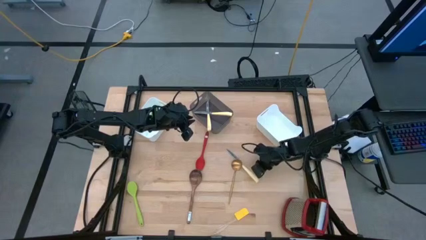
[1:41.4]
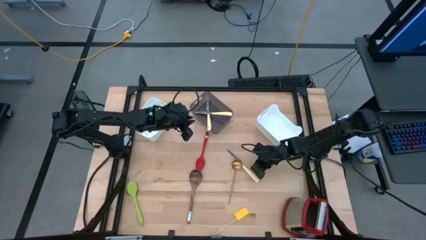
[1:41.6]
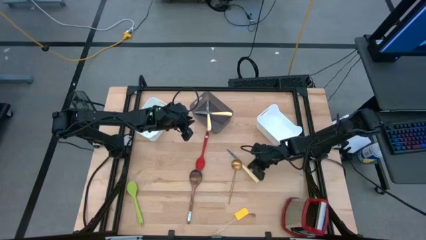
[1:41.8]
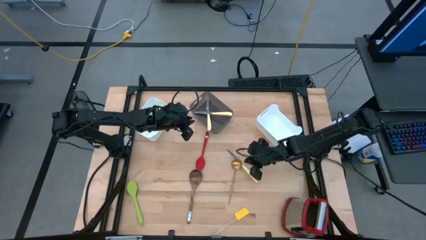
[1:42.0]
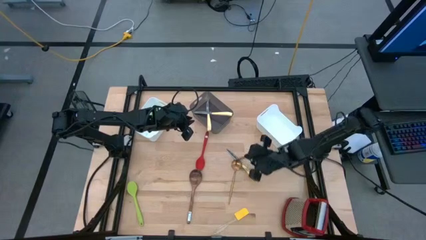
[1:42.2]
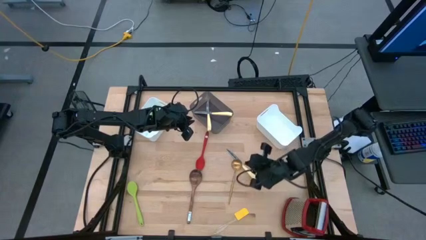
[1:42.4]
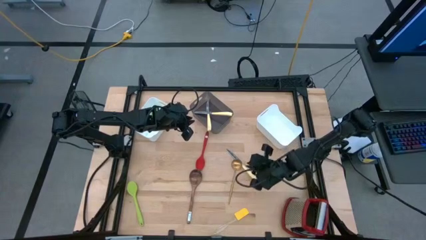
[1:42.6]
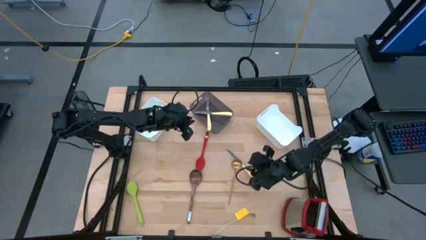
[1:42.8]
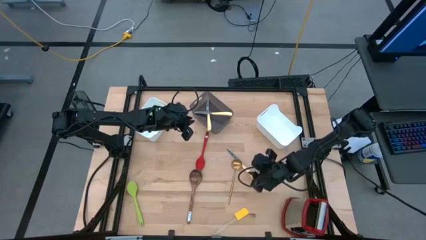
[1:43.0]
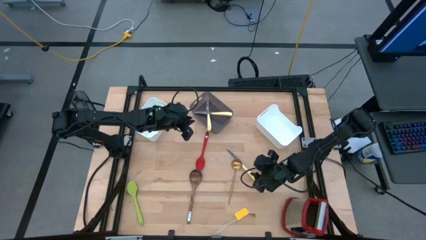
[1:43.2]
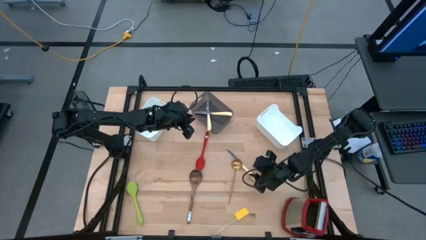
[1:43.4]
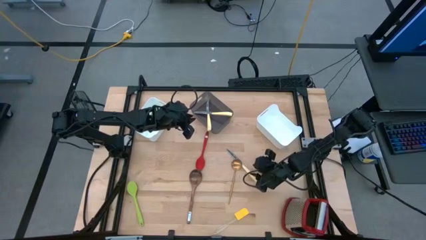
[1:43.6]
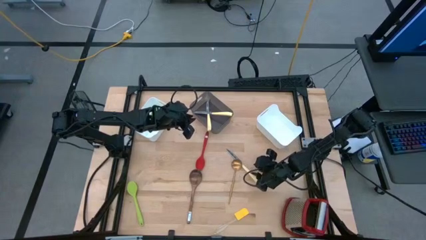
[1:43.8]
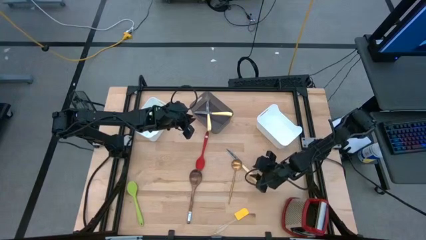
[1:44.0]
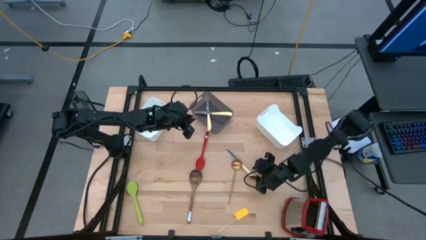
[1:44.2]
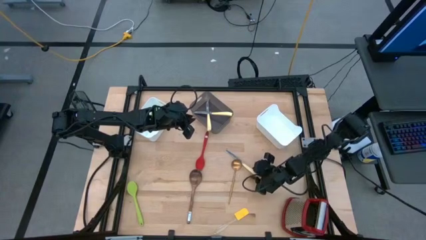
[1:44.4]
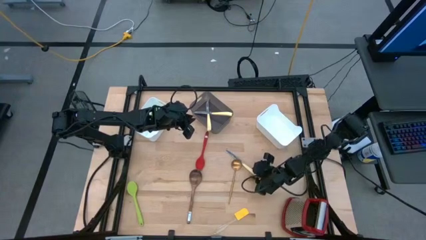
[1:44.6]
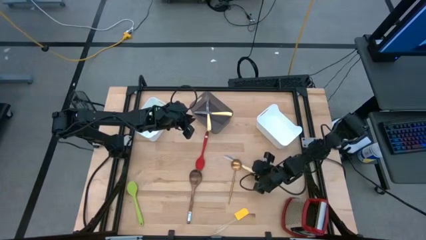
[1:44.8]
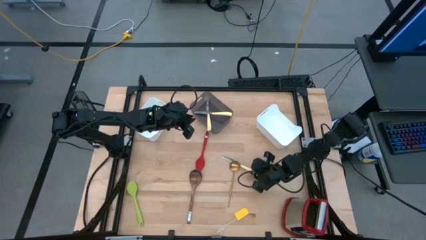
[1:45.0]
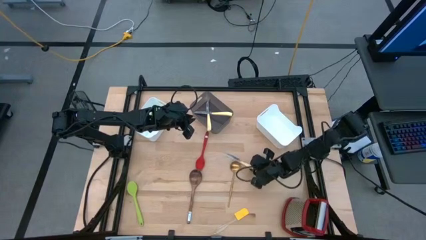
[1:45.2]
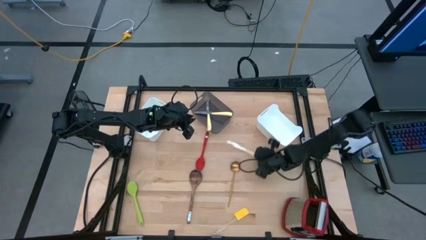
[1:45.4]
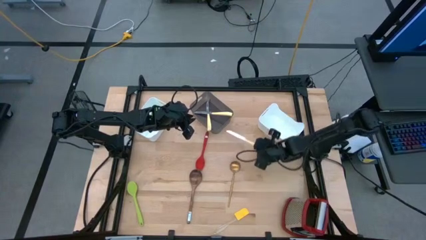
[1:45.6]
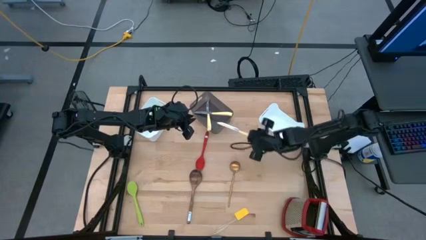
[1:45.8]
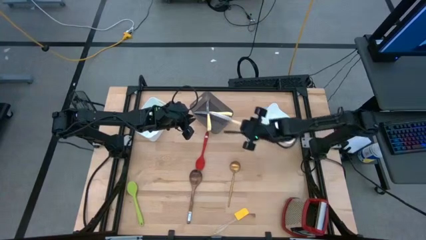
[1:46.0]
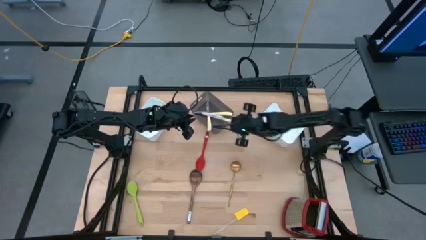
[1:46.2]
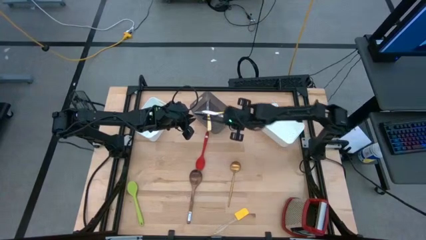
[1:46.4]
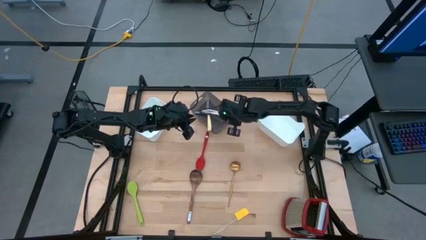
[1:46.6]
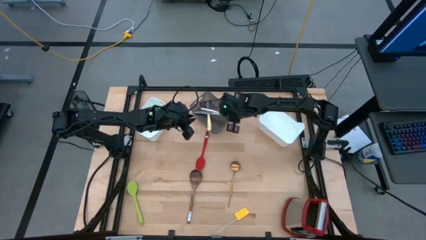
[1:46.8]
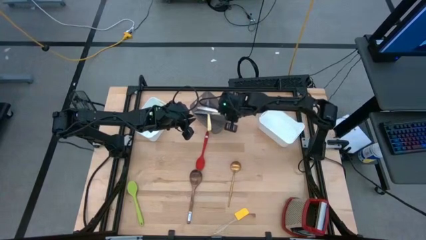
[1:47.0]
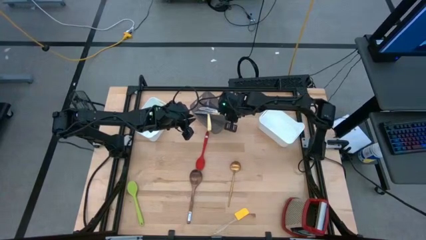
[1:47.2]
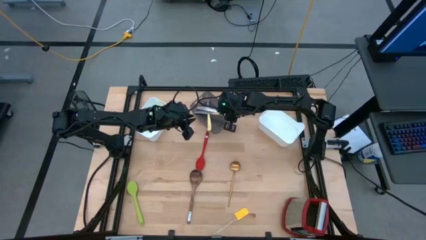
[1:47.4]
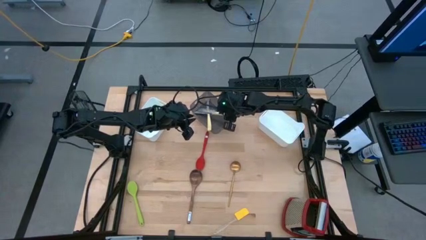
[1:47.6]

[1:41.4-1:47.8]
Task: Pick & Place Kitchen Items
Put the yellow table knife into black bin

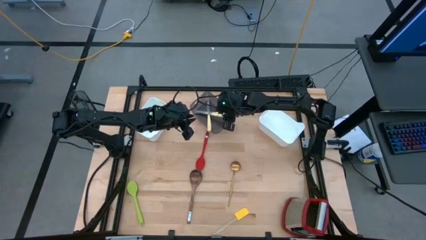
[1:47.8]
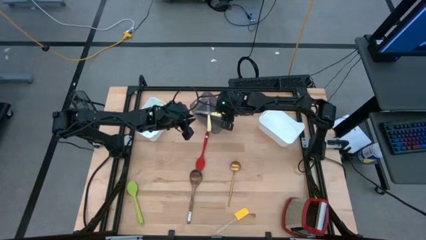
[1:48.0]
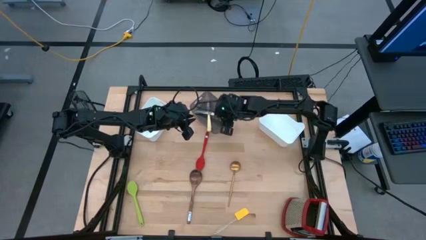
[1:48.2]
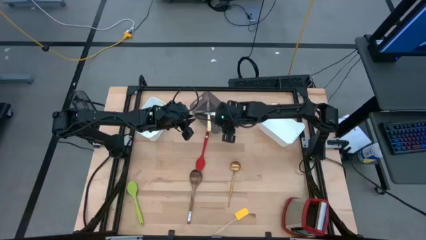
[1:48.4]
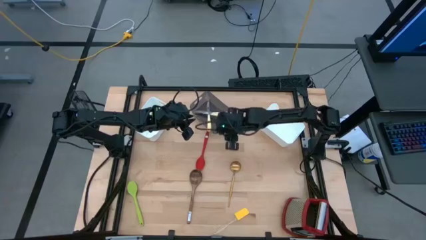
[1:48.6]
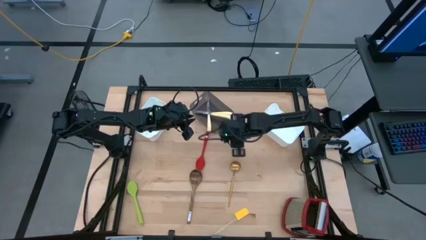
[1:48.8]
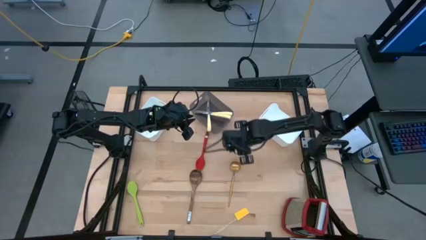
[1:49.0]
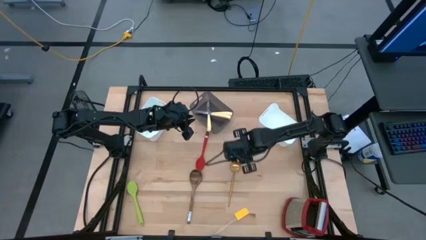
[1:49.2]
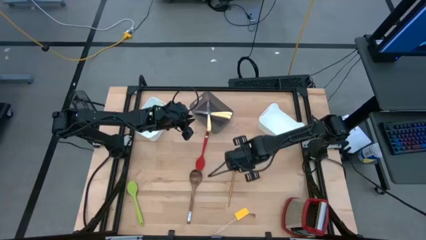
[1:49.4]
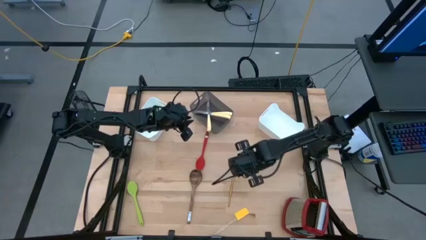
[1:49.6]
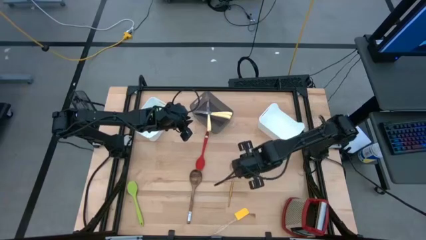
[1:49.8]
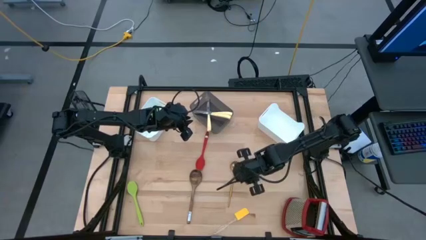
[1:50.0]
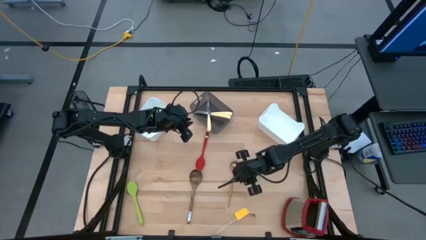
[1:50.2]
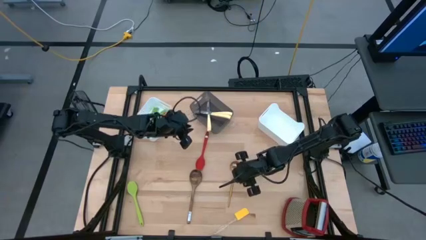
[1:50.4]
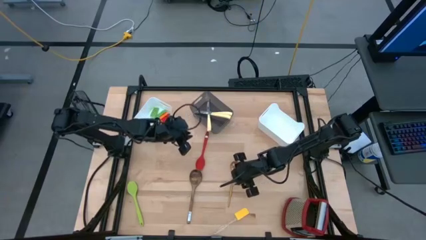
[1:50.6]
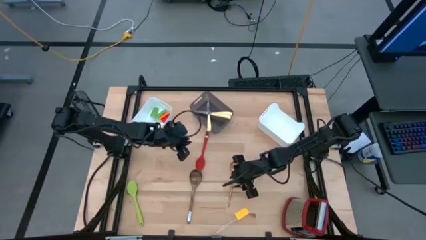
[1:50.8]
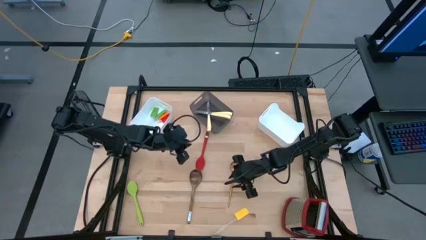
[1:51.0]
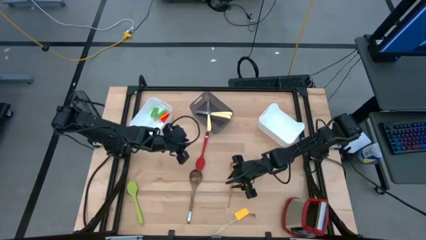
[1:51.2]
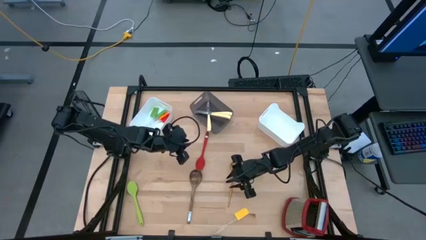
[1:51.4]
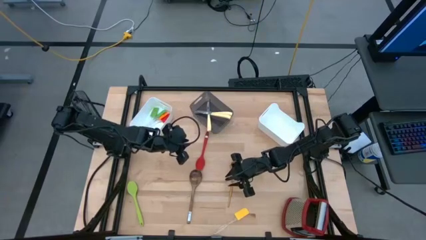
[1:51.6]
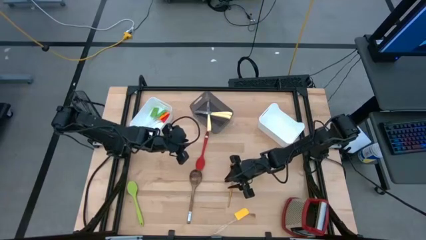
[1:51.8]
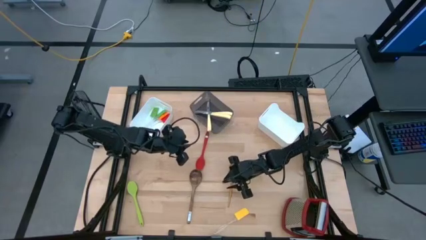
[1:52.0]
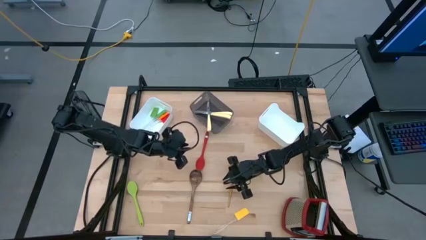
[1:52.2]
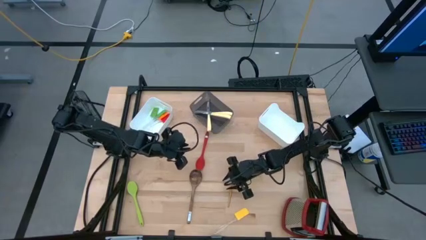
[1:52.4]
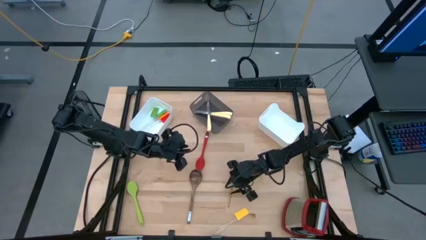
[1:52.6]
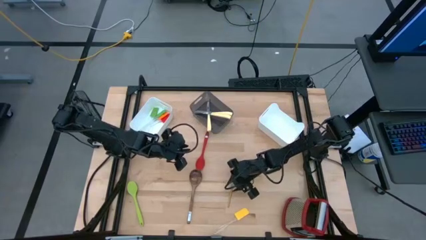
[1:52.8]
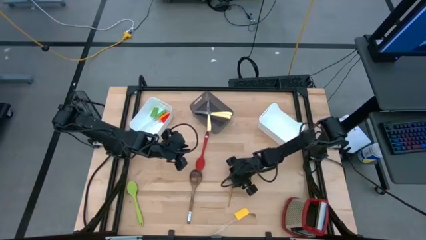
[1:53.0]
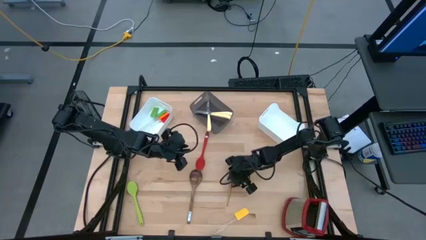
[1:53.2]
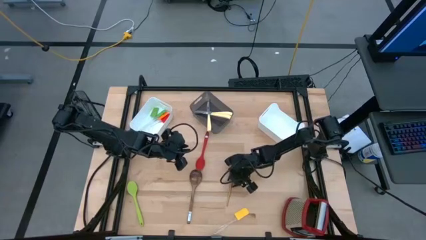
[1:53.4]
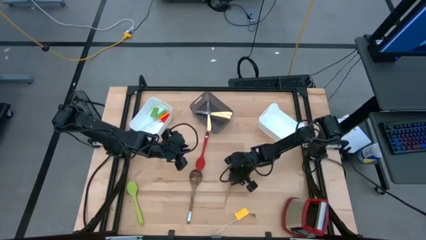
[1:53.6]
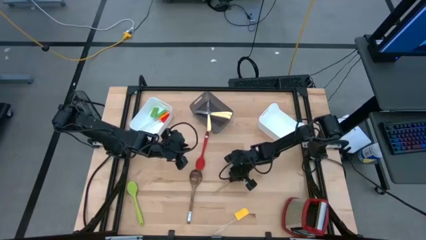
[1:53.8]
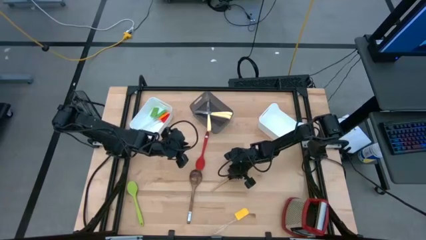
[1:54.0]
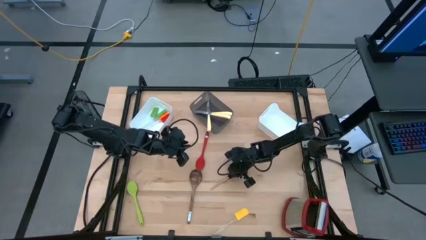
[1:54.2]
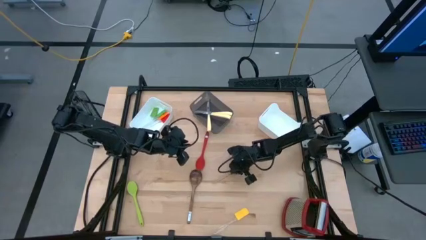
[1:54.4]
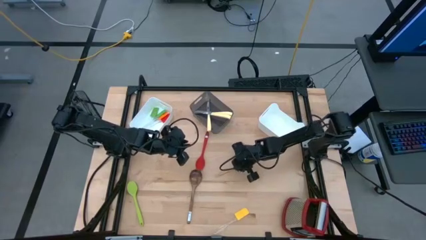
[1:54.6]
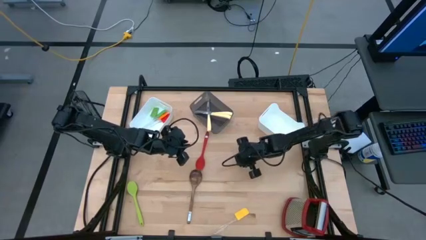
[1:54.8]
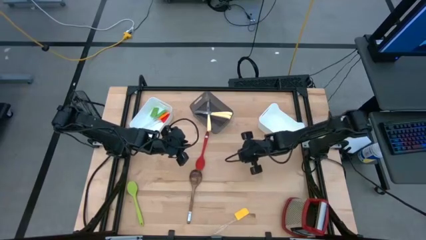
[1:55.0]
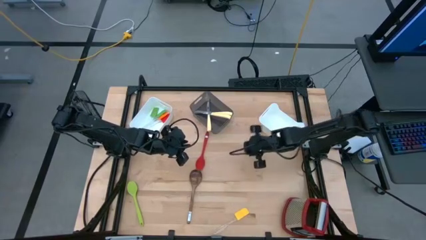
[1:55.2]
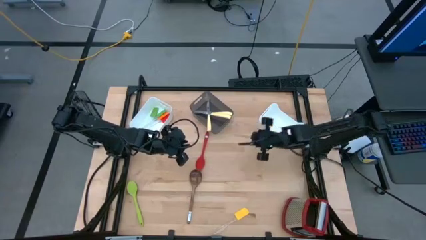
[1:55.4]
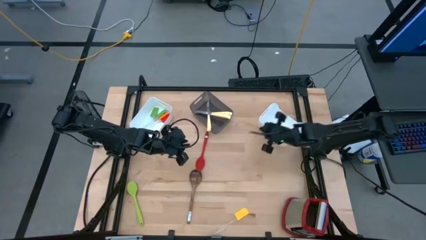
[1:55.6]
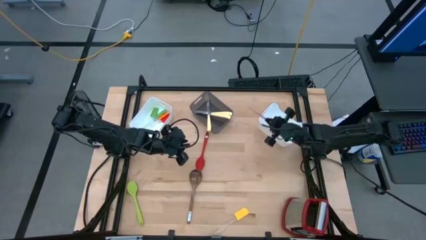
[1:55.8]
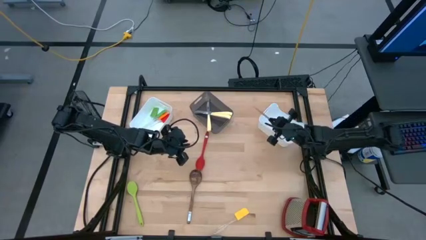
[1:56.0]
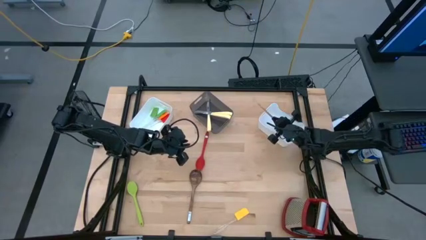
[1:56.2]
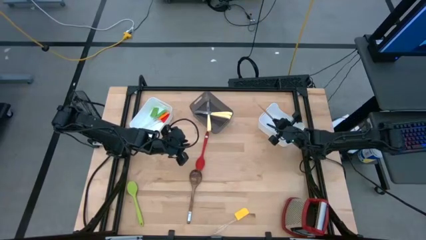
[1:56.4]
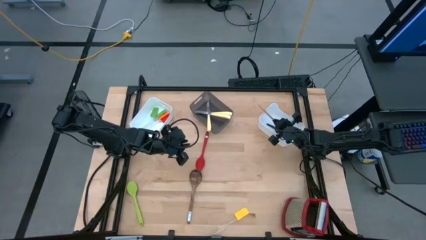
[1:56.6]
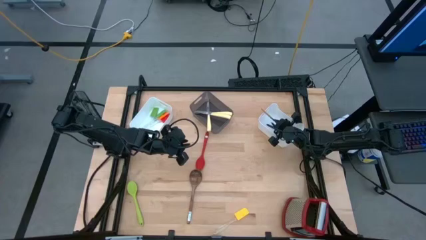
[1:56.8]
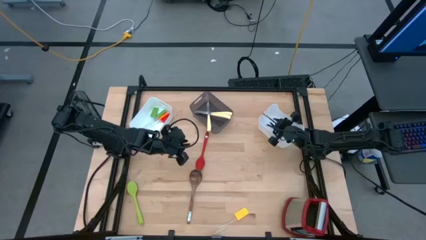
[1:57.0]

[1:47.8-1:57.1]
Put the gold serving spoon into the right white bin
